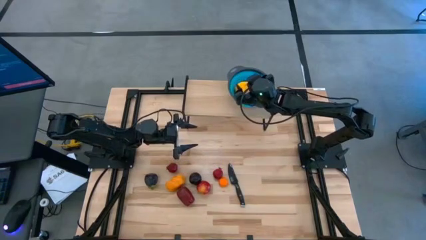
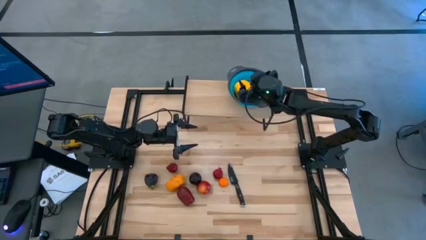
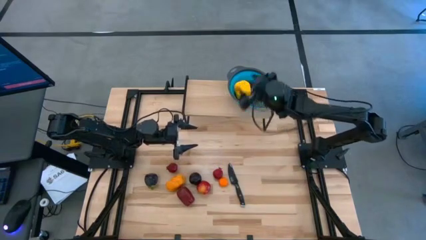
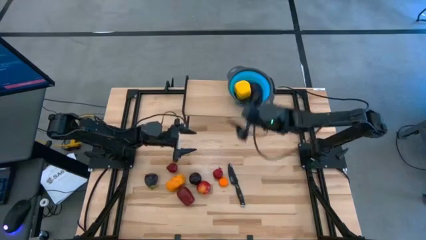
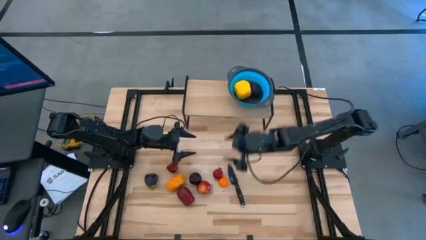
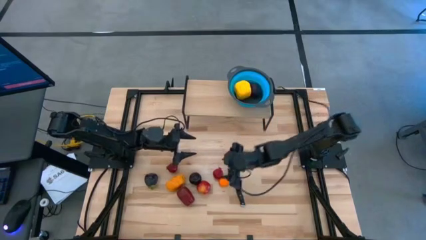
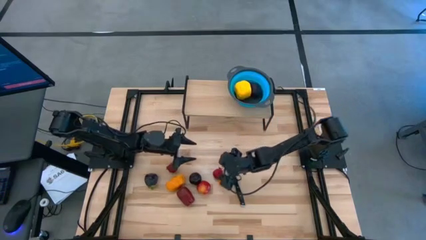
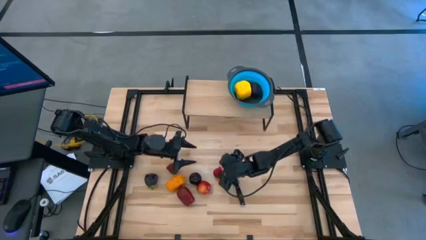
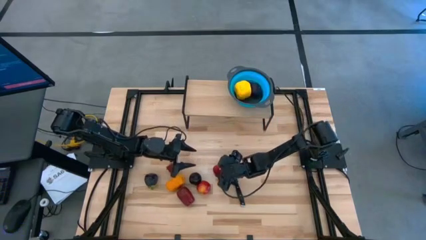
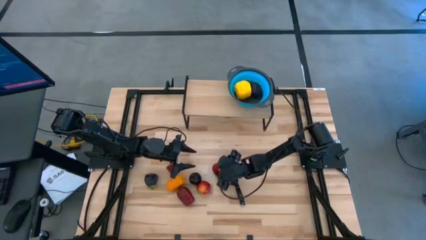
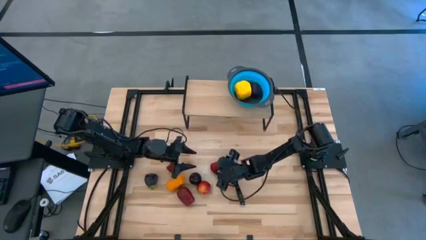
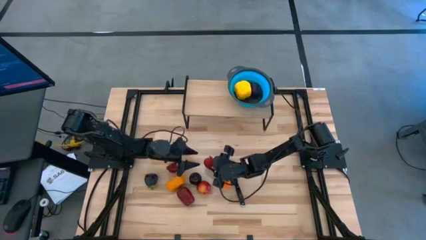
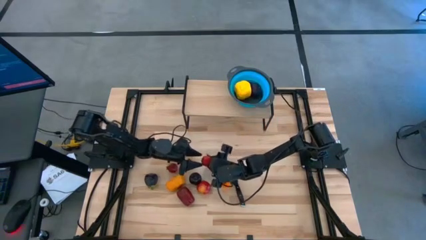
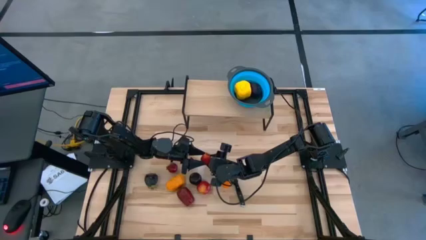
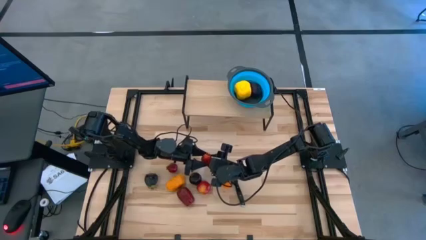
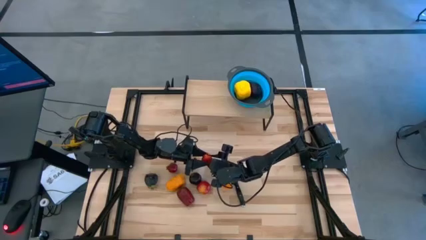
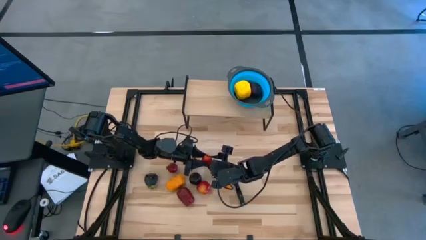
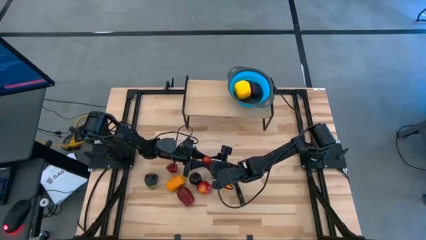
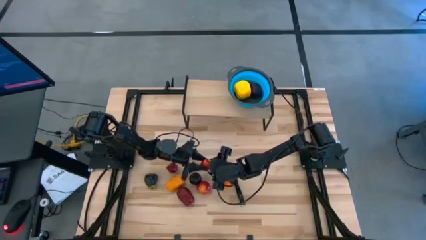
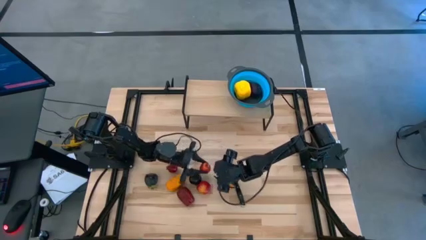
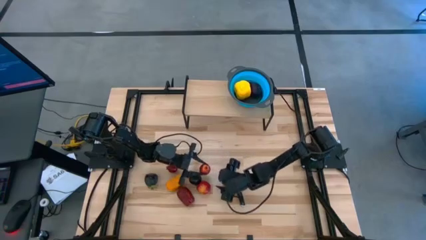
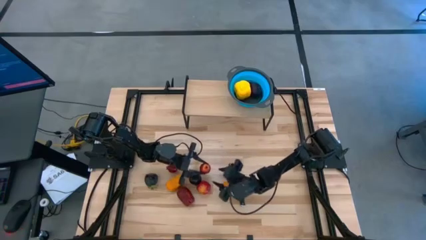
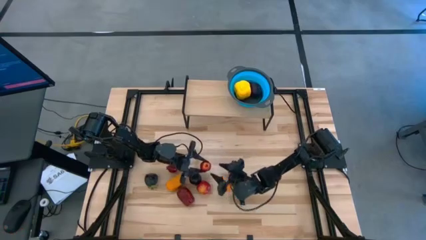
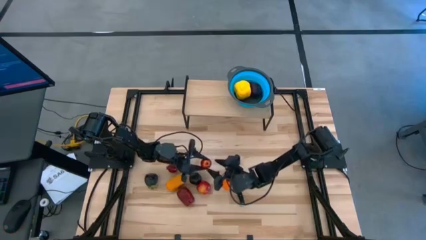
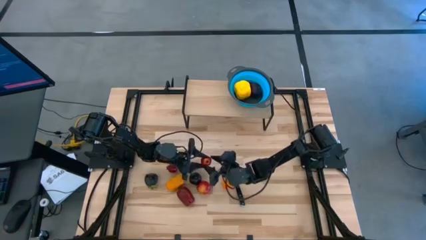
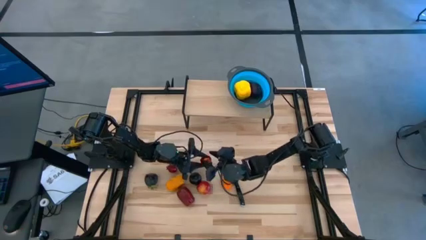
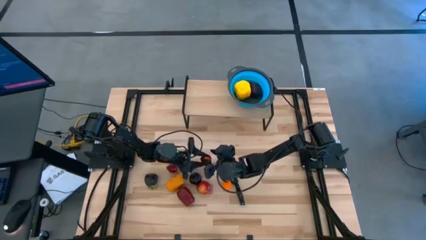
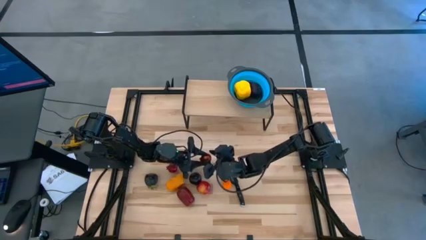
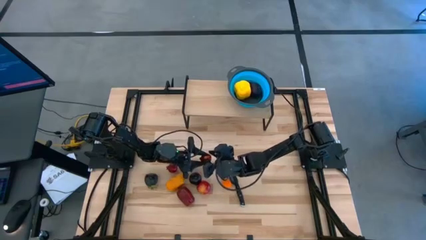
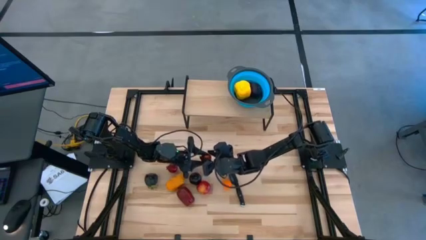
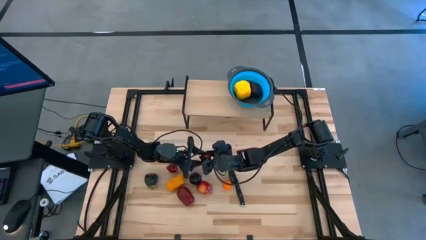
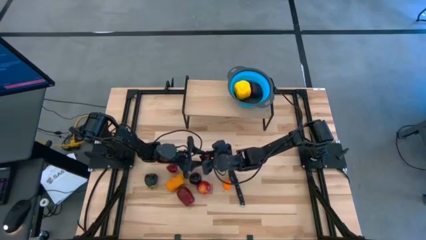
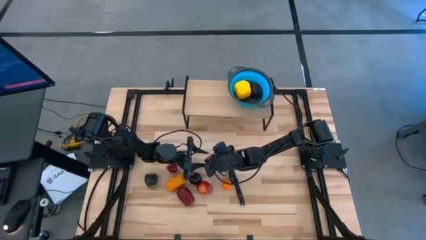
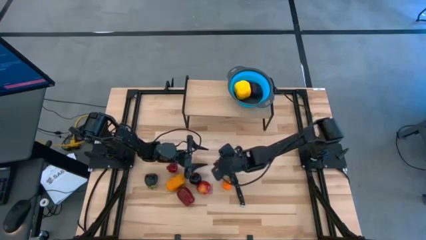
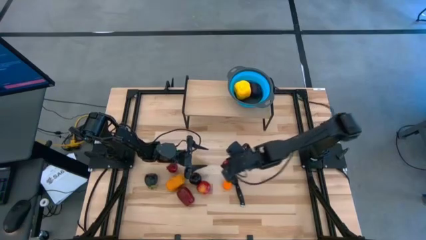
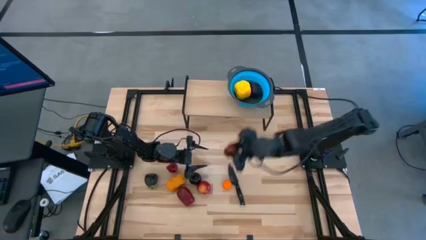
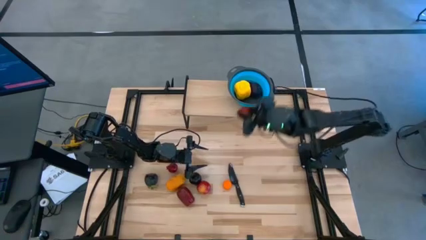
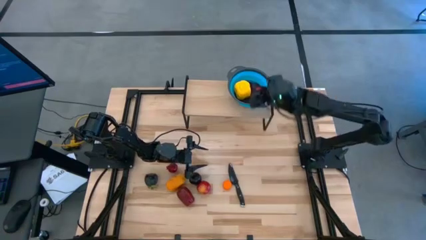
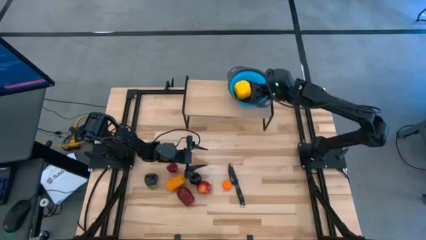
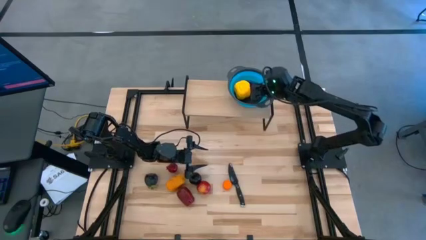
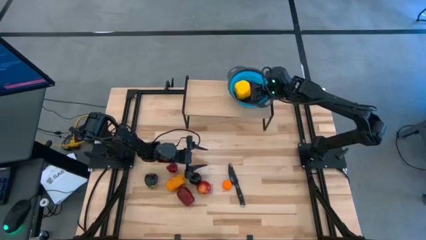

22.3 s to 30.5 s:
Task: Pick & Place Fruit
Put the right red pomegranate into the blue strainer bowl on the shelf

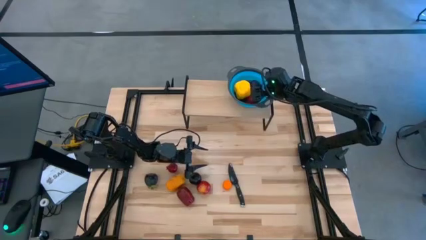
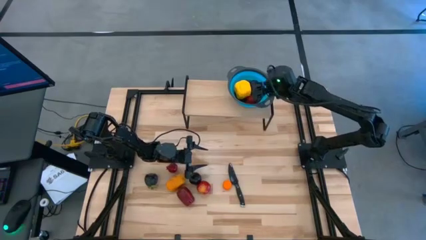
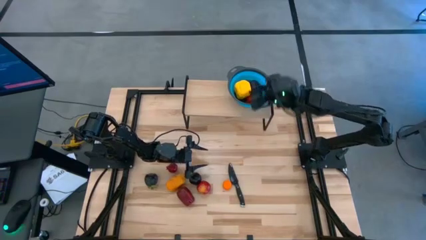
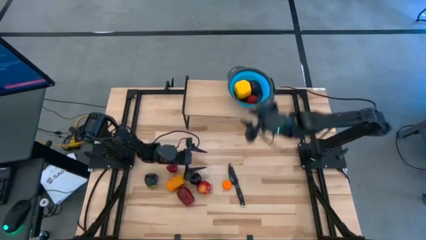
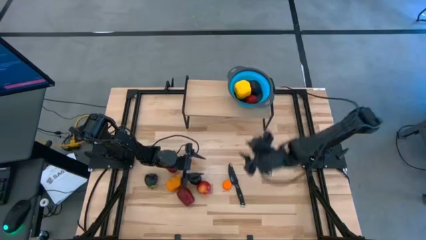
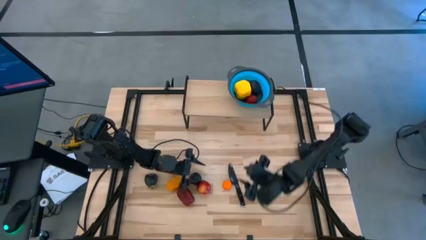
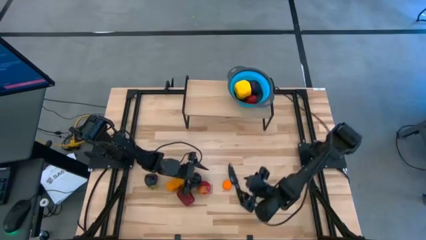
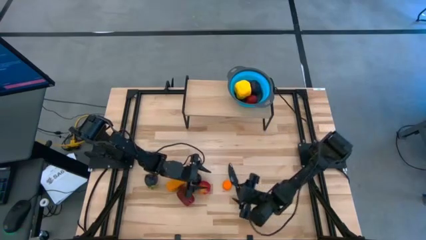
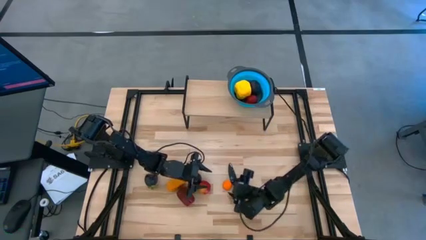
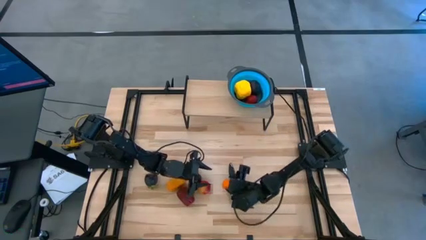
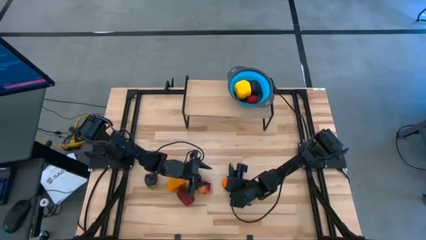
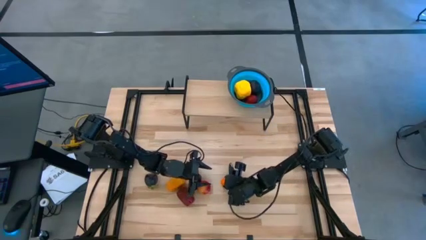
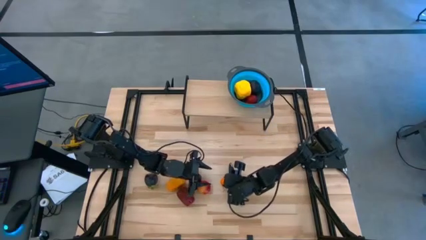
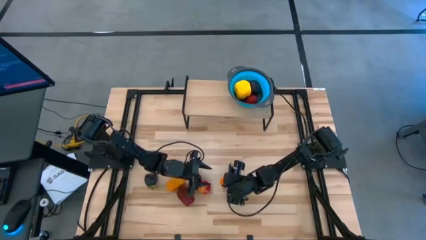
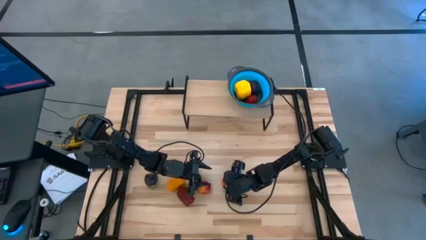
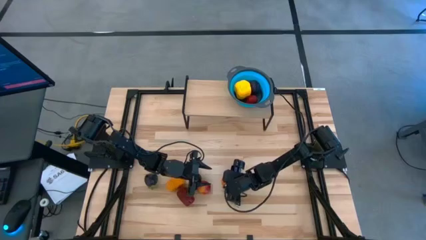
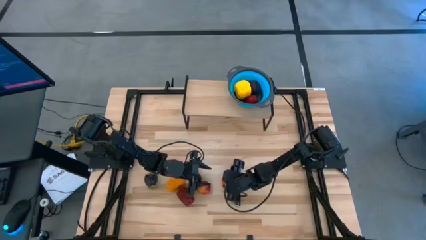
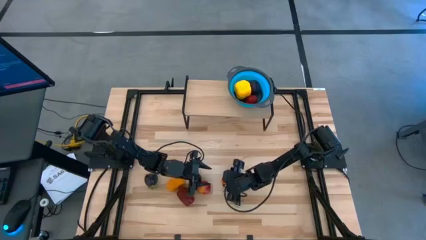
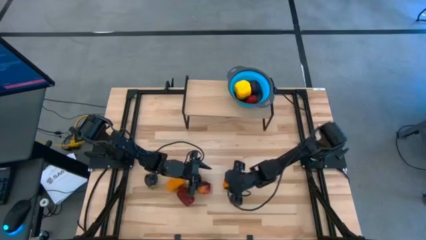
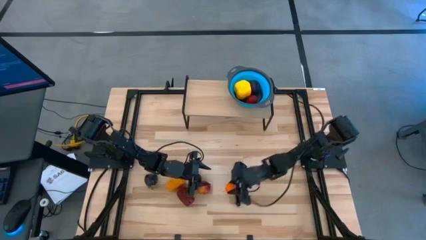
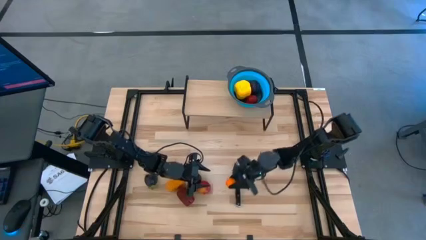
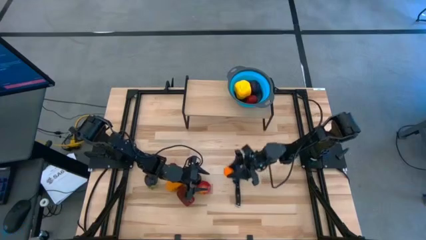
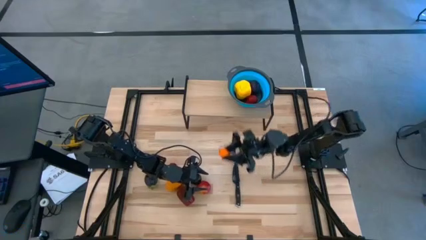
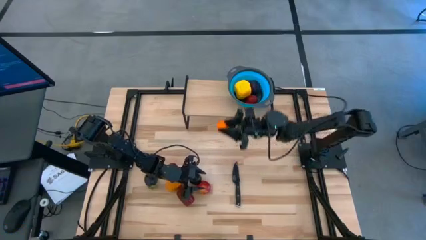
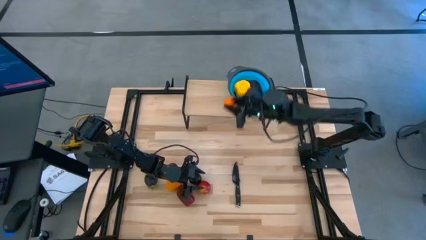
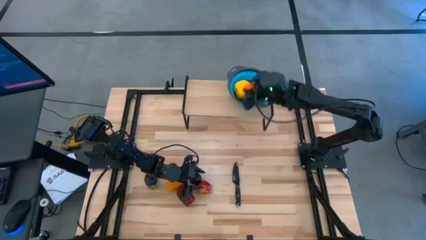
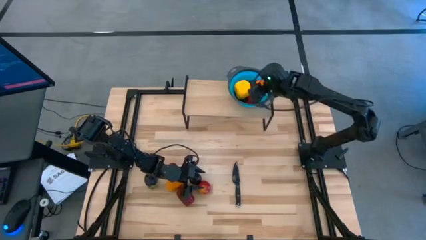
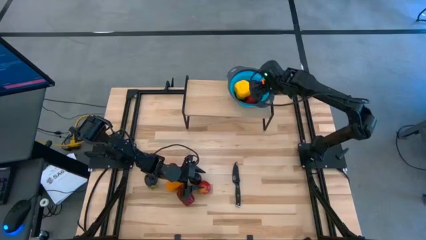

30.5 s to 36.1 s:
Put the orange into the blue strainer bowl on the shelf

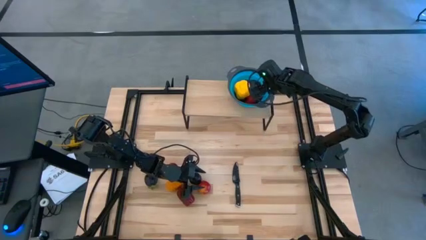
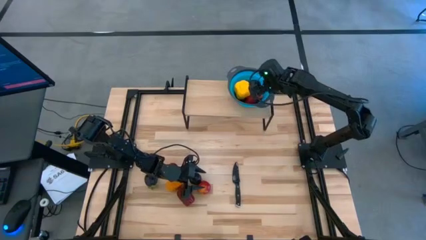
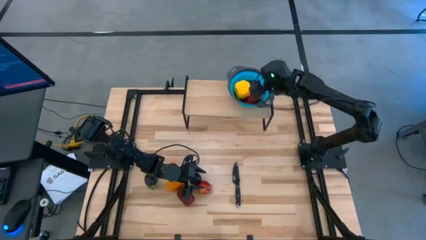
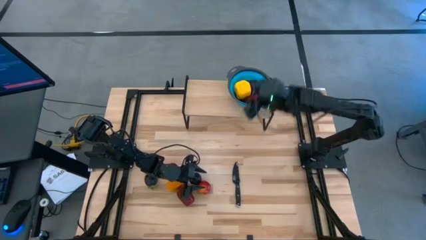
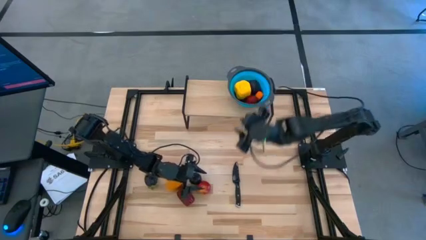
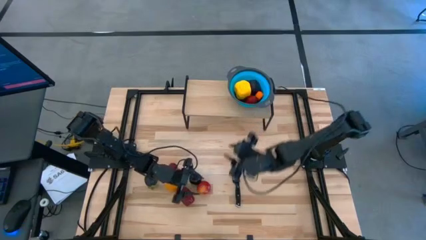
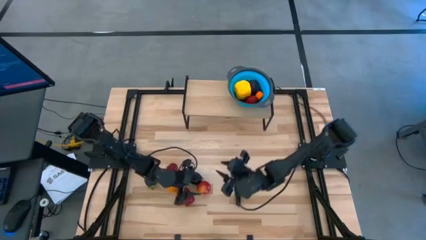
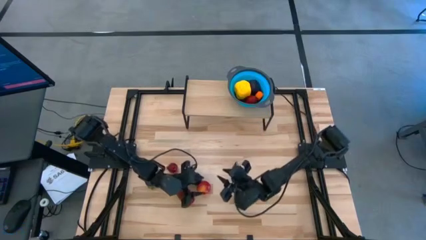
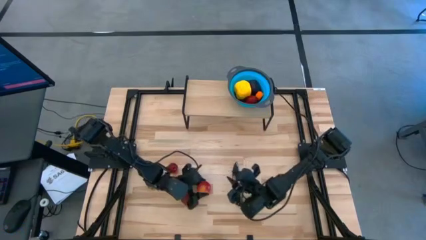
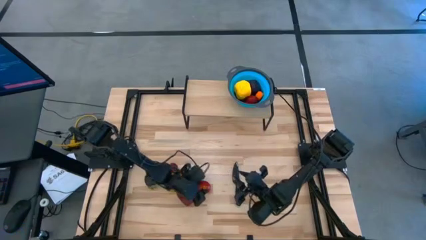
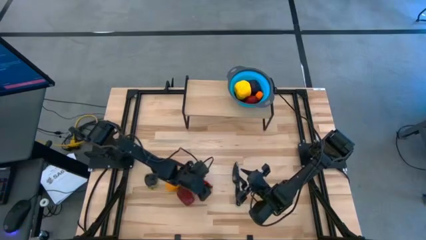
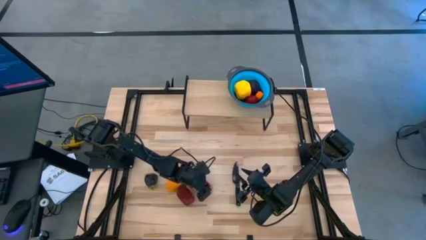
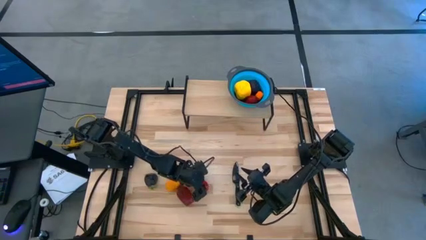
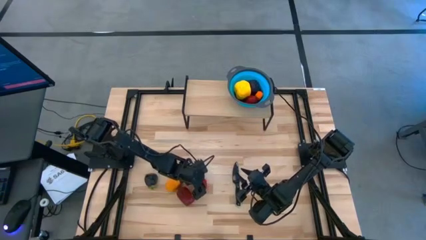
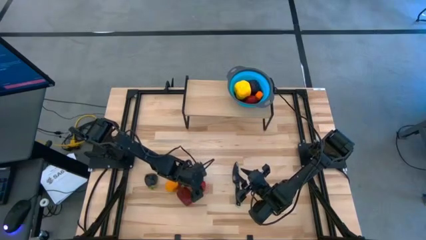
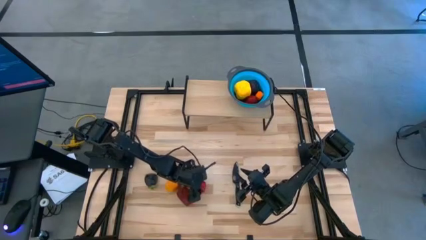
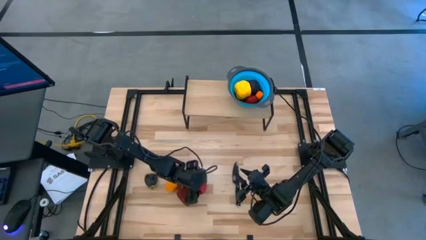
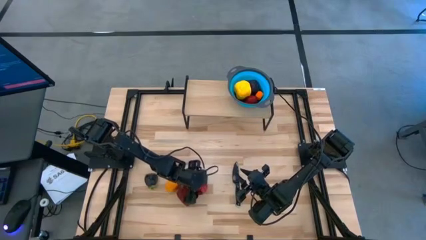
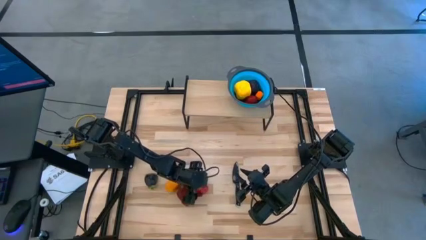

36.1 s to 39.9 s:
Put the right red apple into the blue strainer bowl on the shelf
